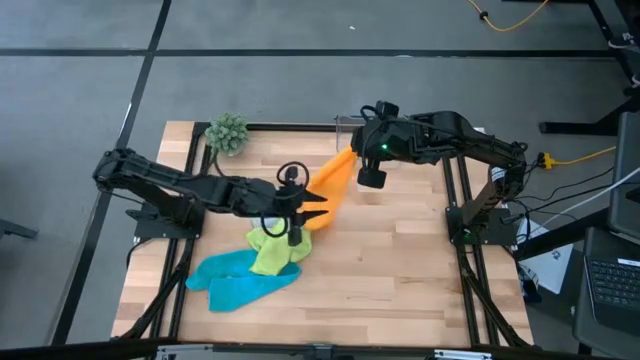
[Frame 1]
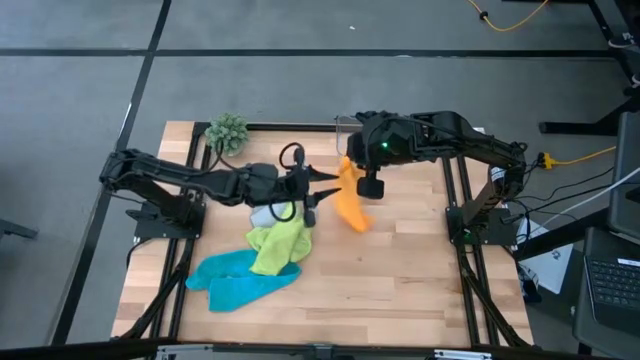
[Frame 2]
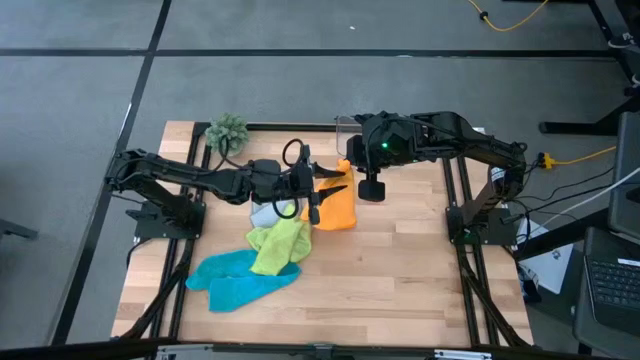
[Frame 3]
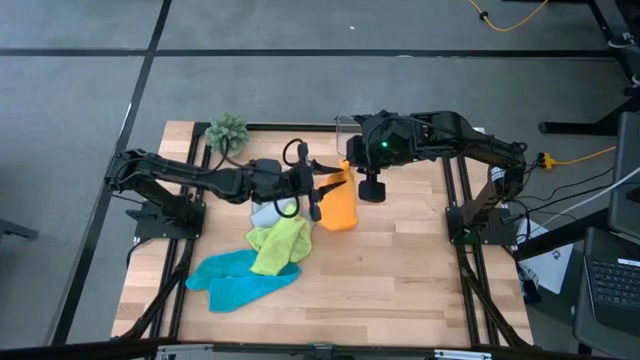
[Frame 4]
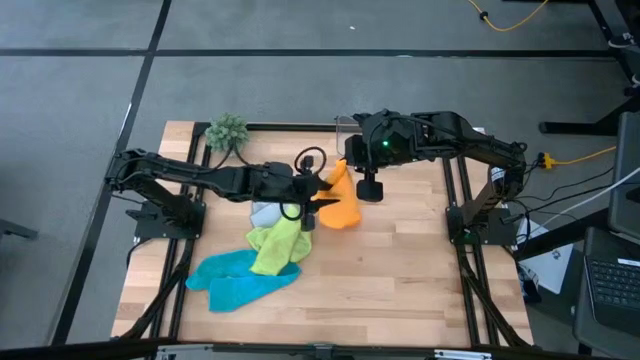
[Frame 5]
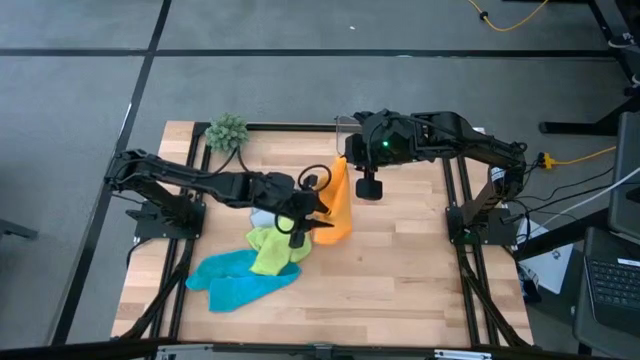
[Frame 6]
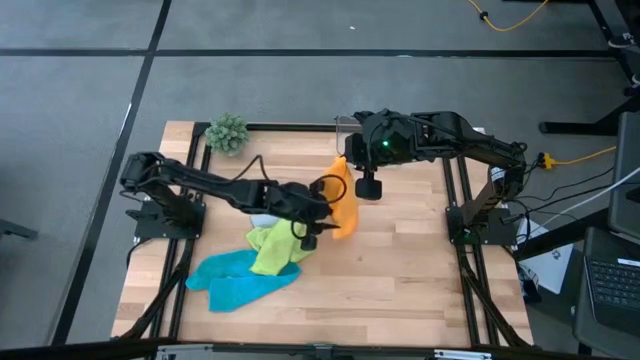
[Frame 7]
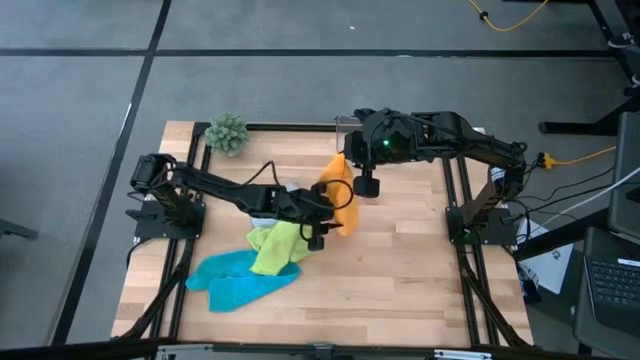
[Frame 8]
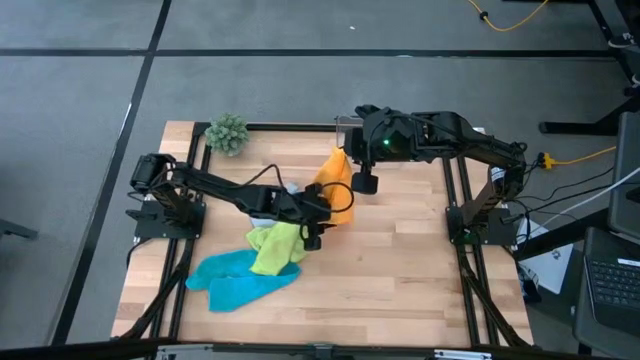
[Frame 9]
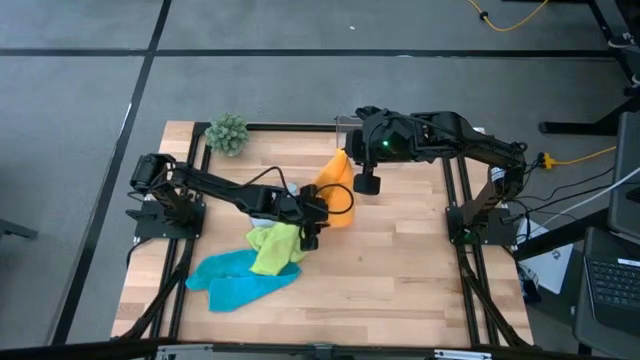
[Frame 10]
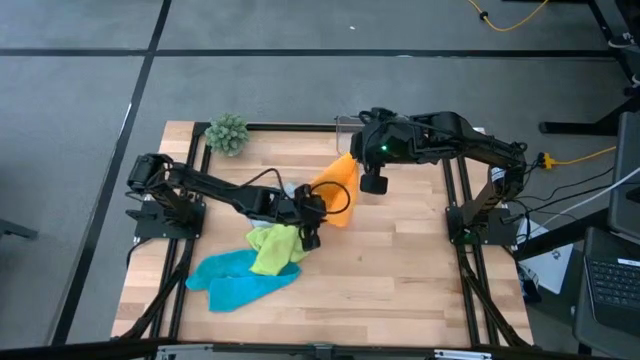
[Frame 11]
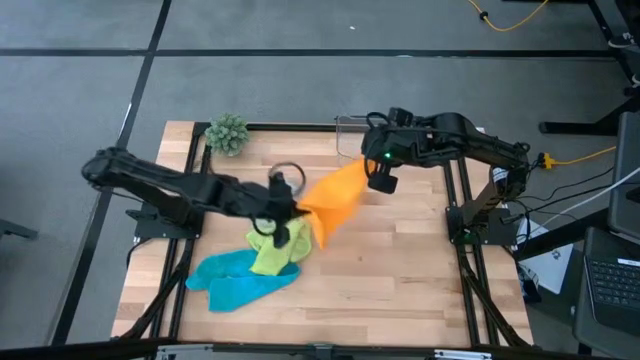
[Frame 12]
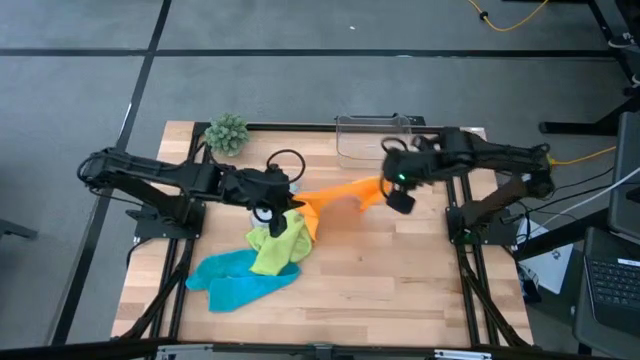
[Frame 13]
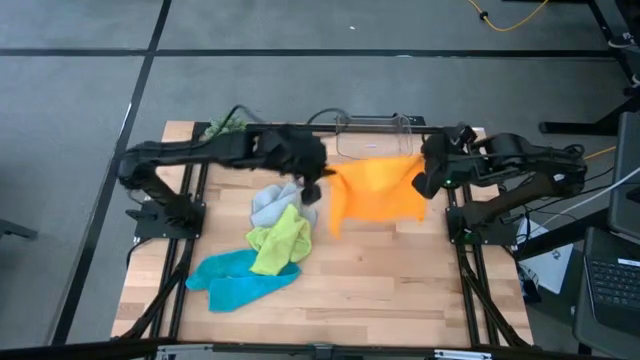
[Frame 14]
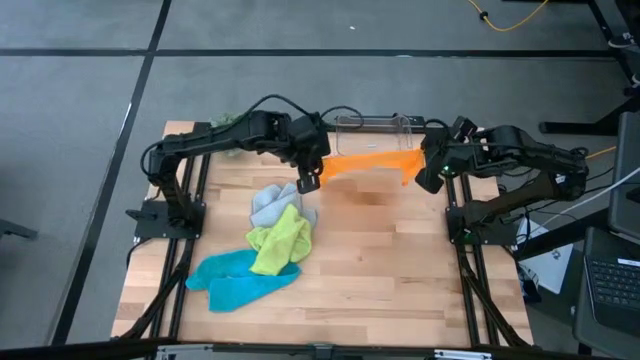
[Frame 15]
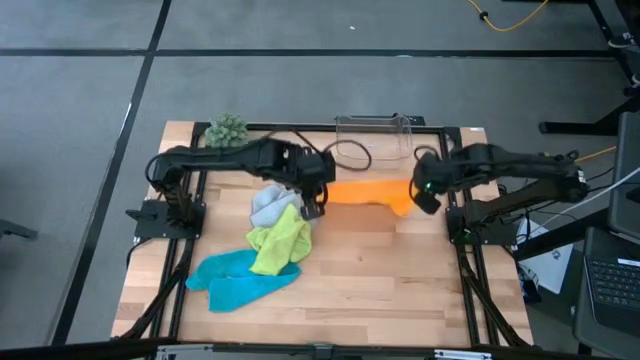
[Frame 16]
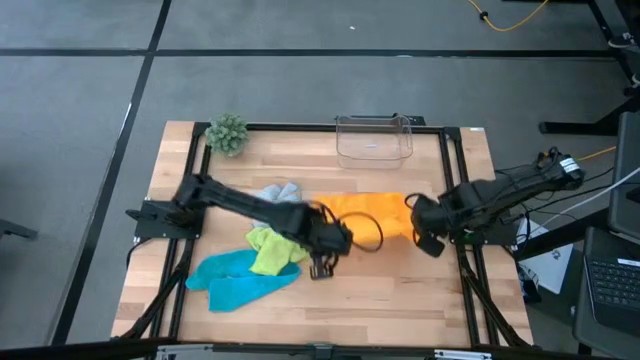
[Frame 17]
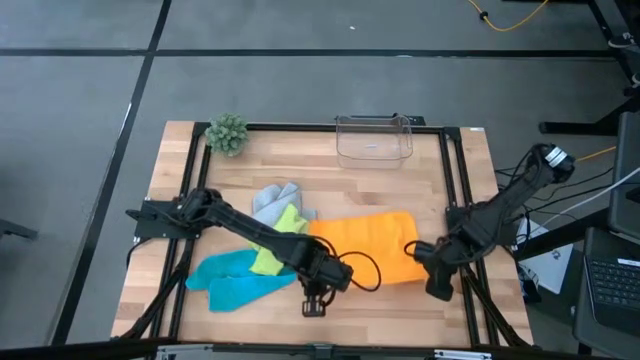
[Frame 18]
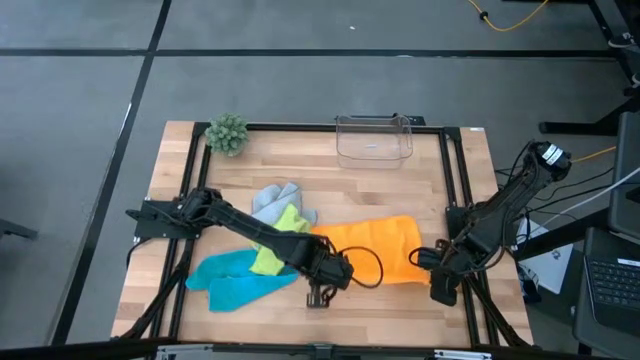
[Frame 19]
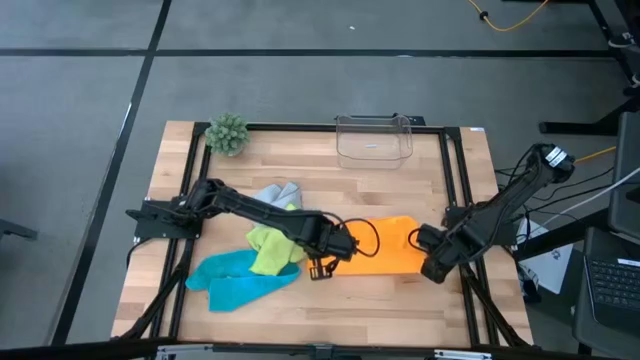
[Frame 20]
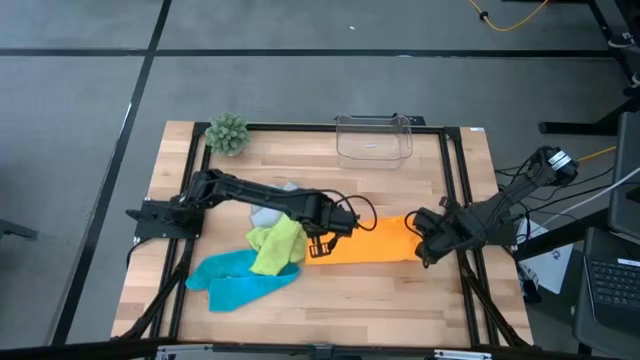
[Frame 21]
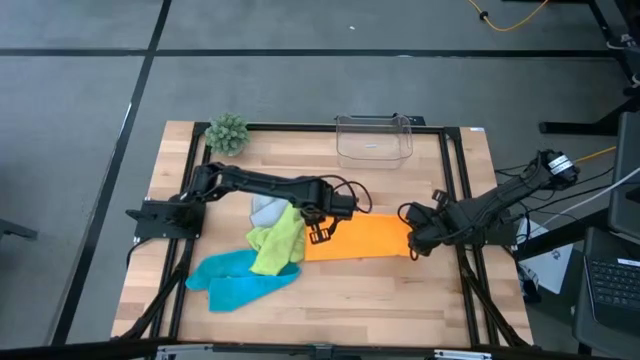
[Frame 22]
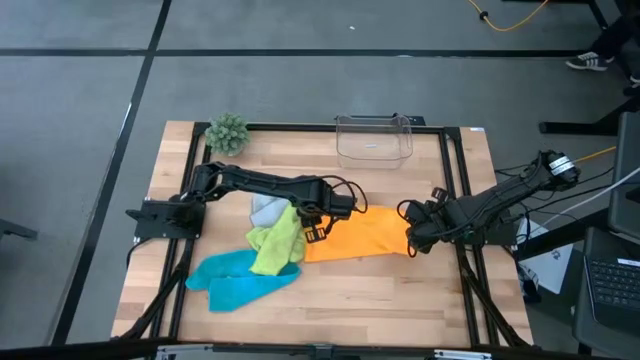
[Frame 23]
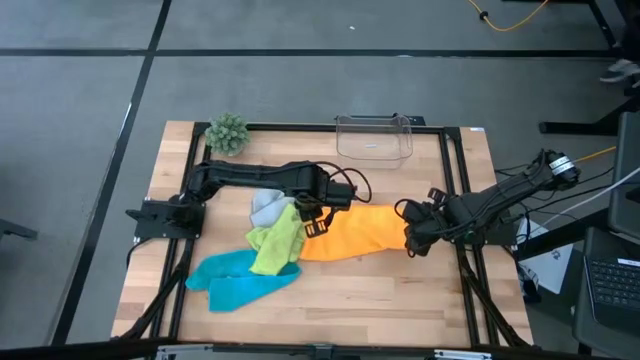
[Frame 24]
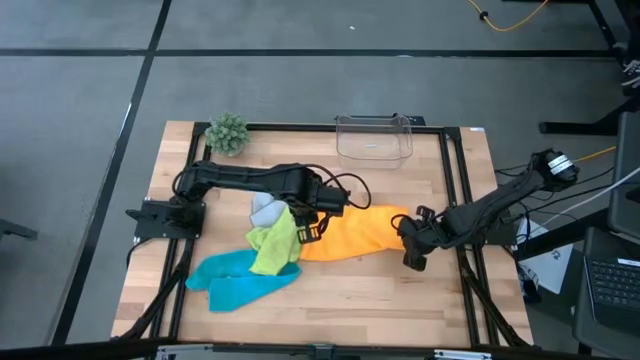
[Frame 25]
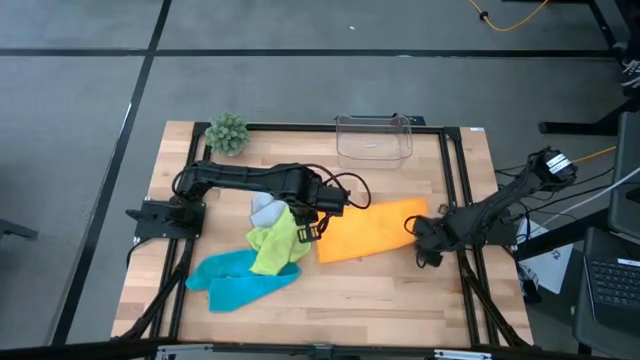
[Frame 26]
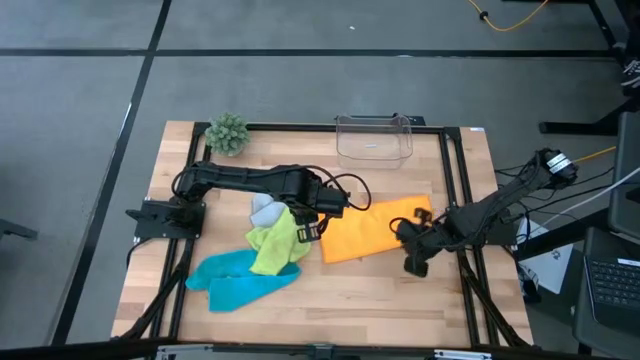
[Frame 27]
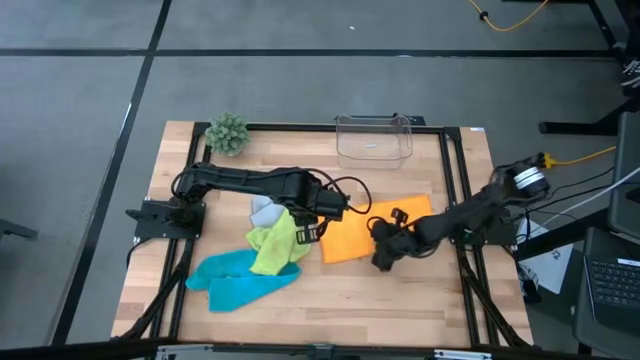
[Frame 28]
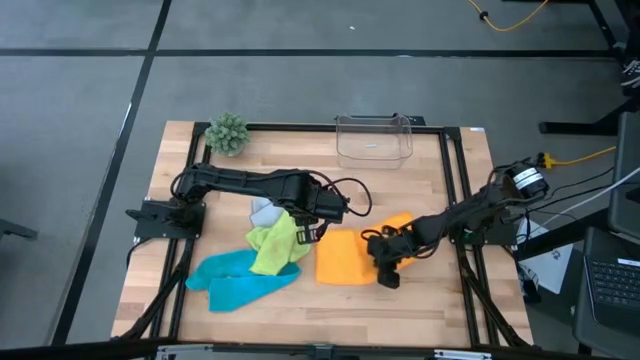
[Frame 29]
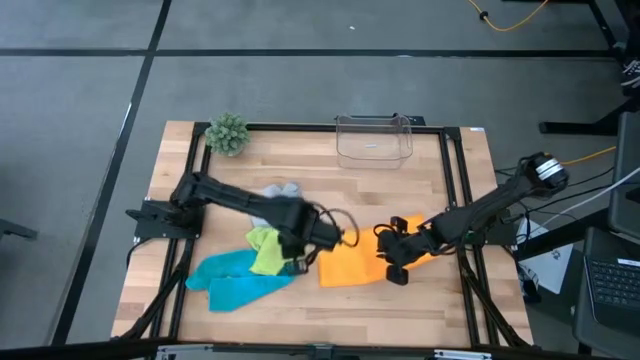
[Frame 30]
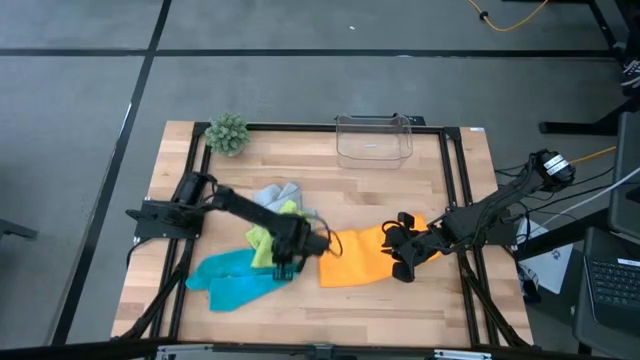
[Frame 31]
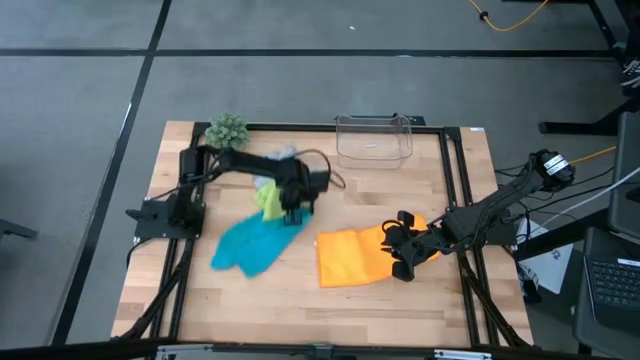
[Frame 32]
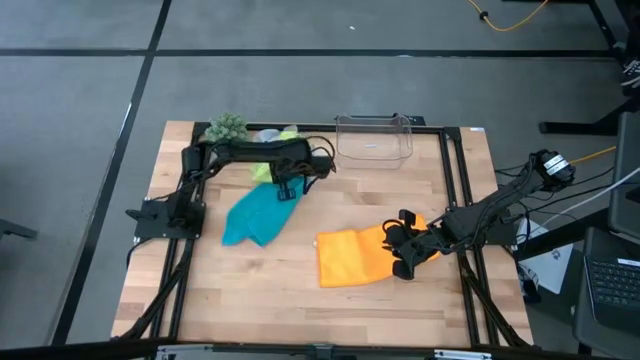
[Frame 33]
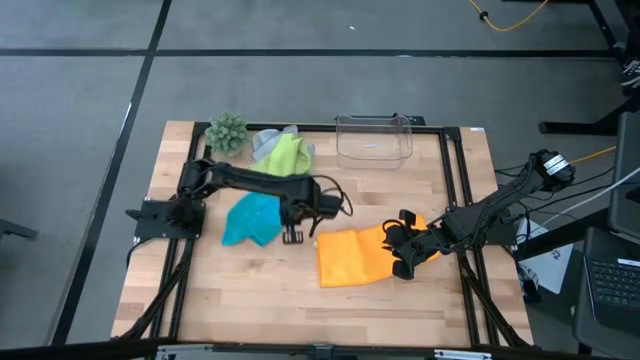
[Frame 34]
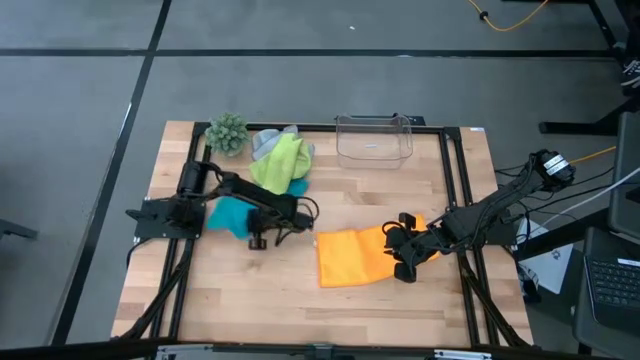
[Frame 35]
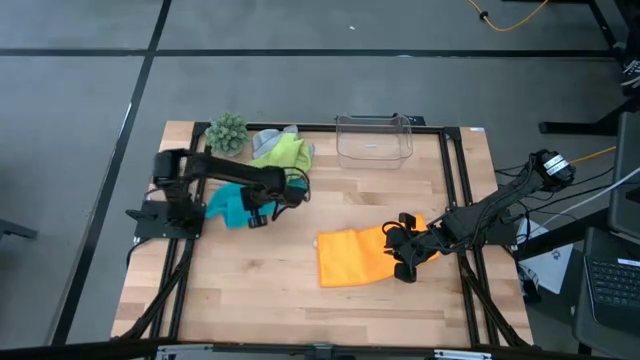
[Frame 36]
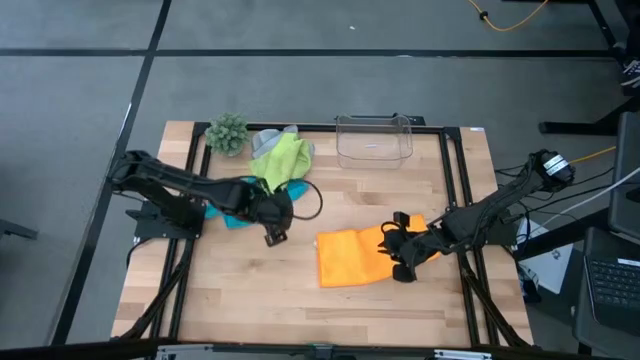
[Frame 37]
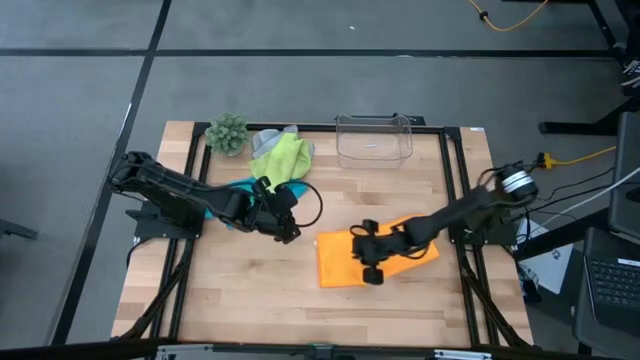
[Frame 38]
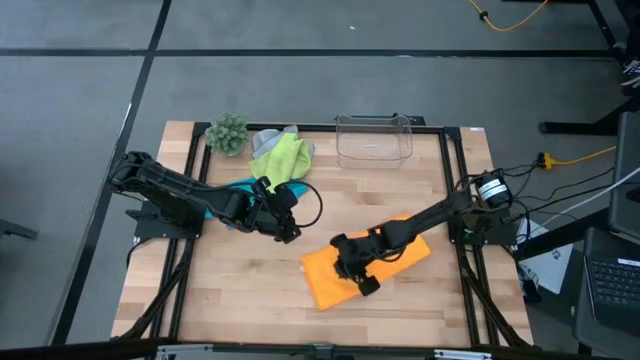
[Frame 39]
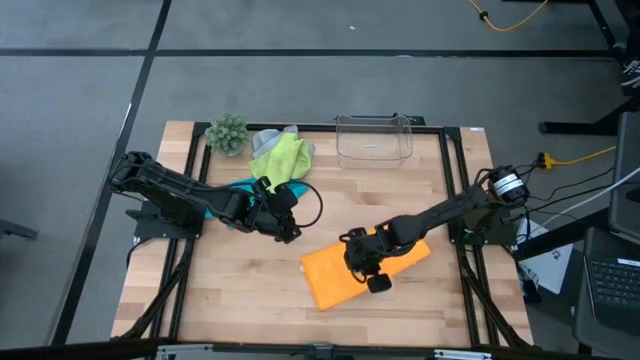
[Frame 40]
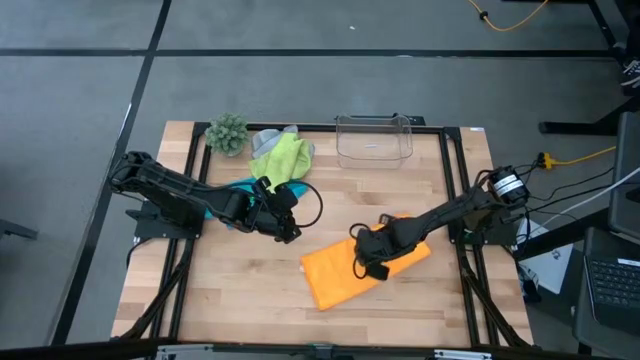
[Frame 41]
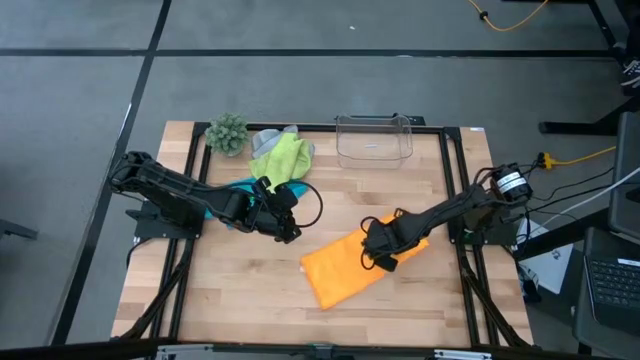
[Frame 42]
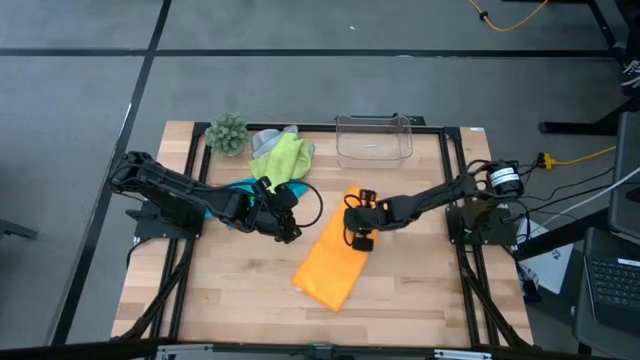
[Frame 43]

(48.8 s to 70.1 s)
Task: Fold microfiber towels
Fold the orange microfiber cloth
